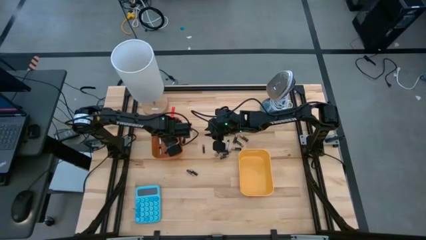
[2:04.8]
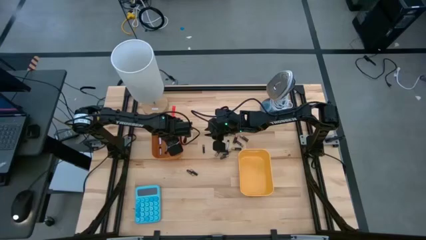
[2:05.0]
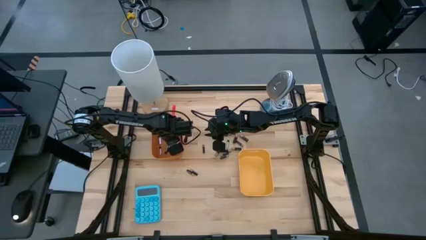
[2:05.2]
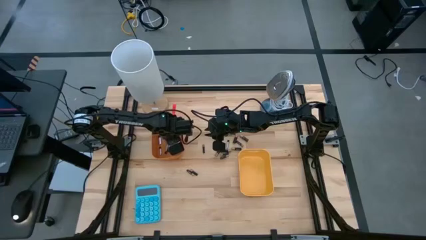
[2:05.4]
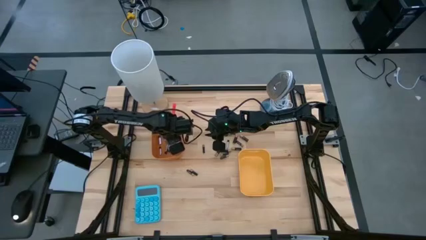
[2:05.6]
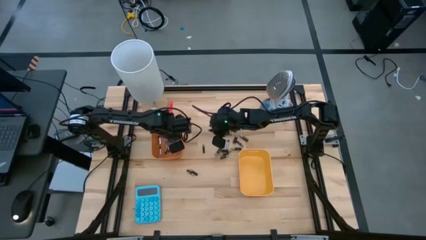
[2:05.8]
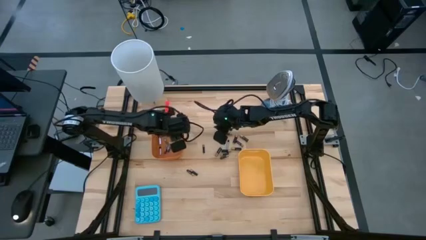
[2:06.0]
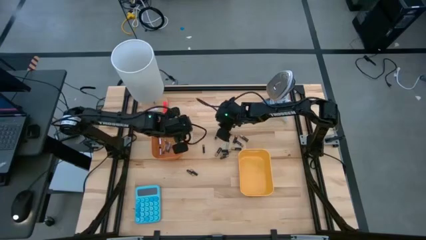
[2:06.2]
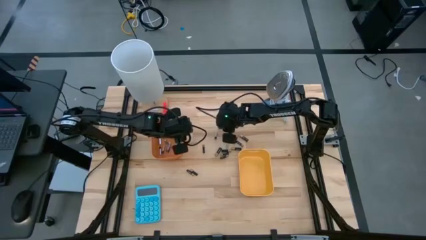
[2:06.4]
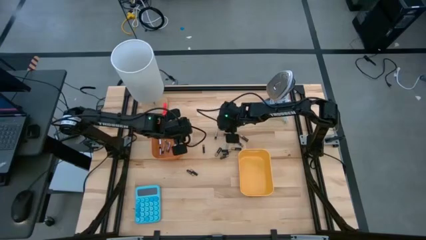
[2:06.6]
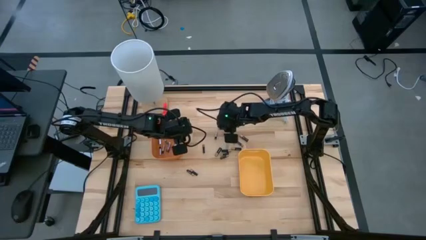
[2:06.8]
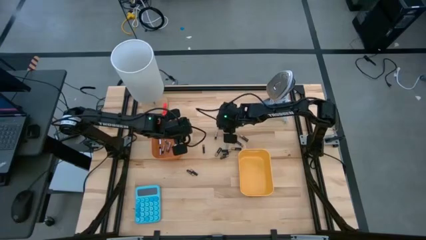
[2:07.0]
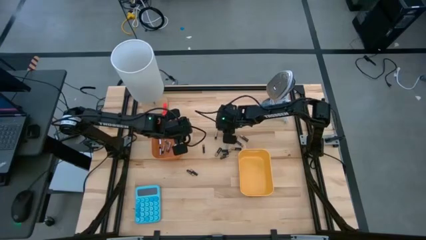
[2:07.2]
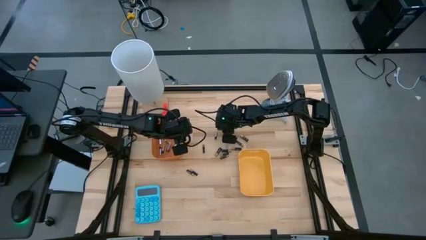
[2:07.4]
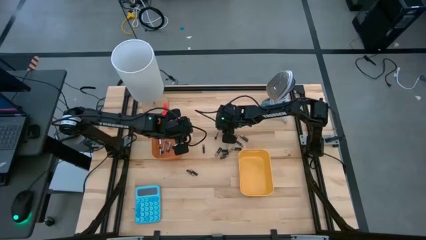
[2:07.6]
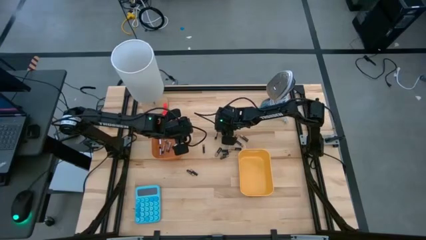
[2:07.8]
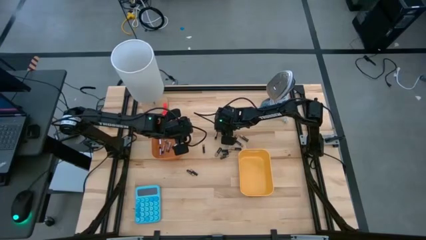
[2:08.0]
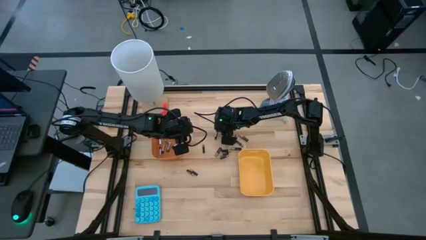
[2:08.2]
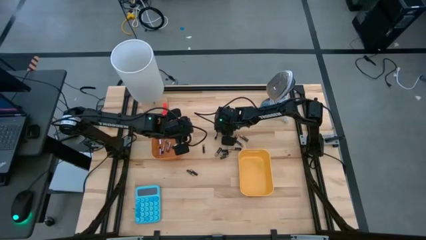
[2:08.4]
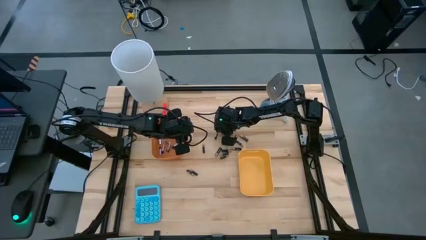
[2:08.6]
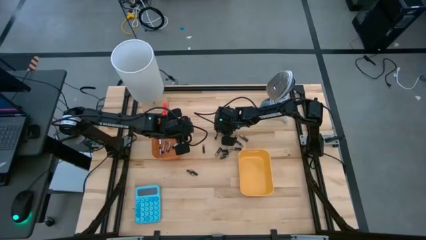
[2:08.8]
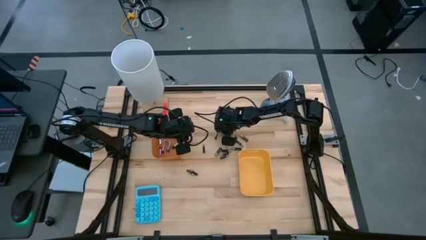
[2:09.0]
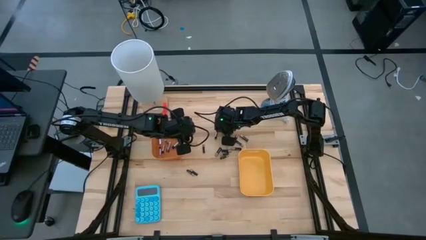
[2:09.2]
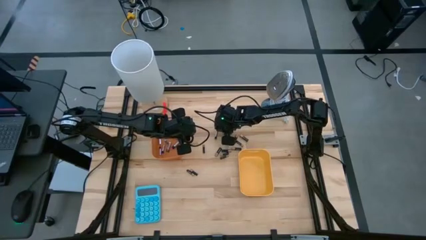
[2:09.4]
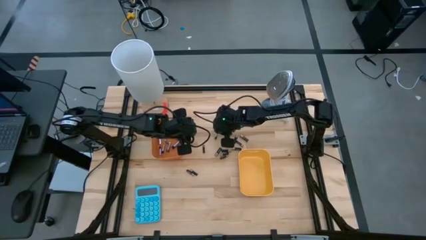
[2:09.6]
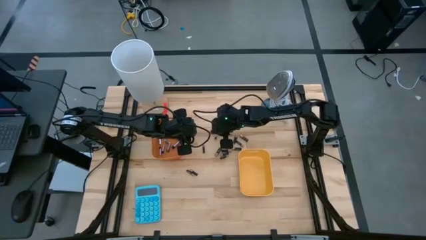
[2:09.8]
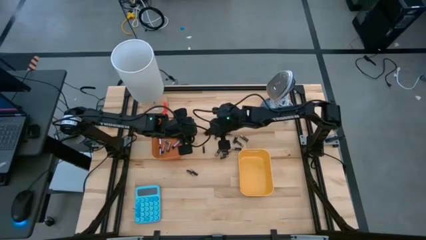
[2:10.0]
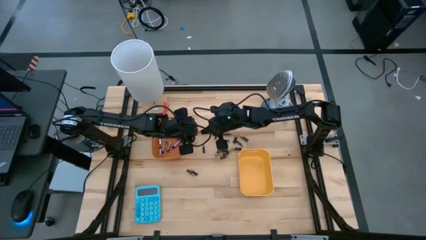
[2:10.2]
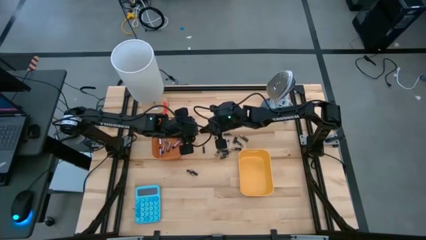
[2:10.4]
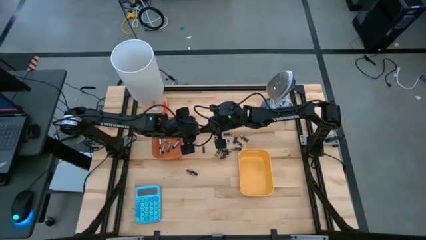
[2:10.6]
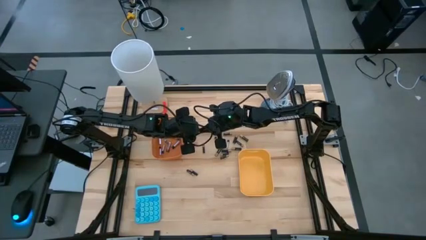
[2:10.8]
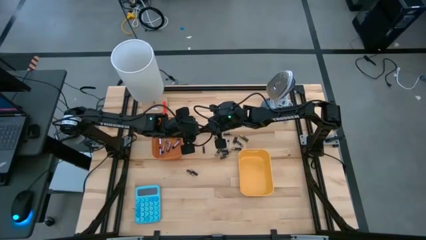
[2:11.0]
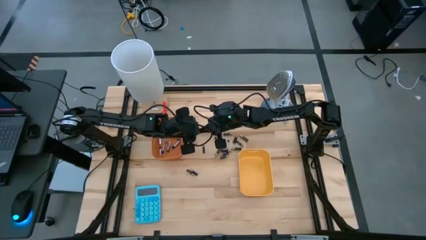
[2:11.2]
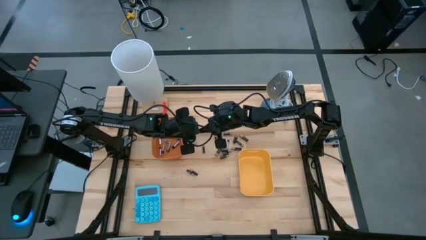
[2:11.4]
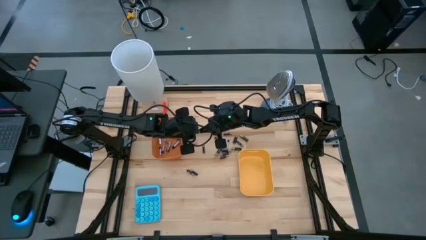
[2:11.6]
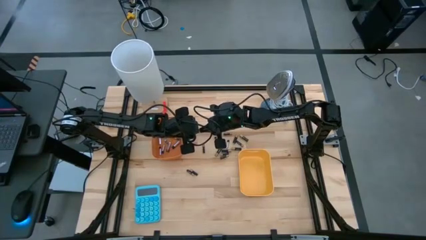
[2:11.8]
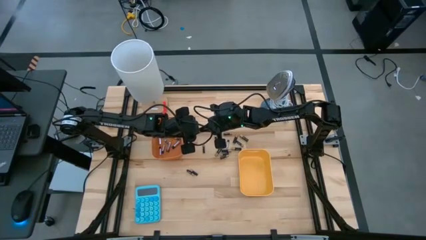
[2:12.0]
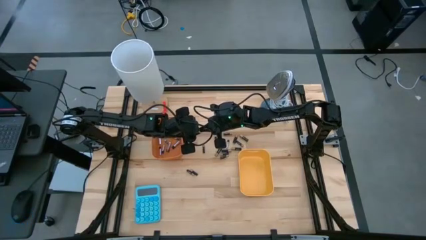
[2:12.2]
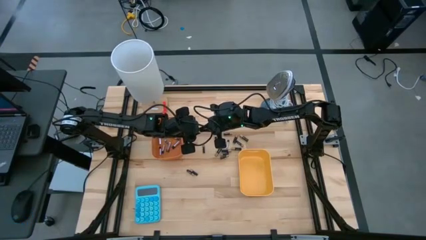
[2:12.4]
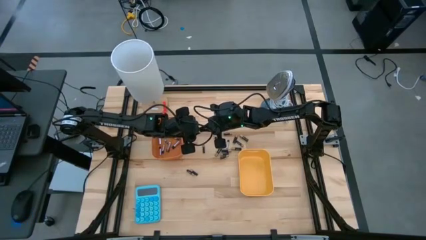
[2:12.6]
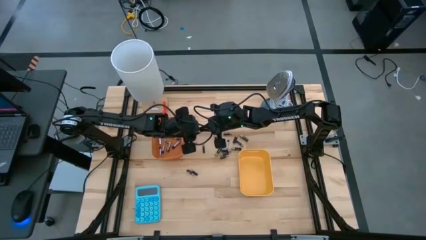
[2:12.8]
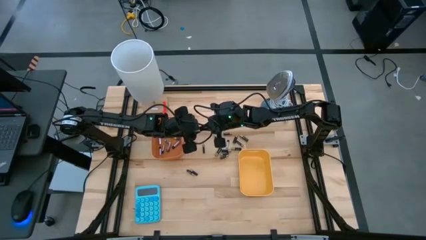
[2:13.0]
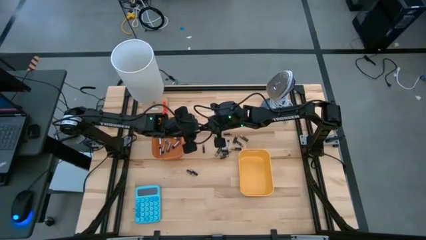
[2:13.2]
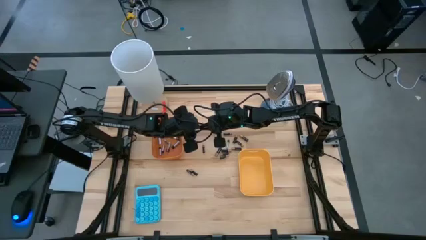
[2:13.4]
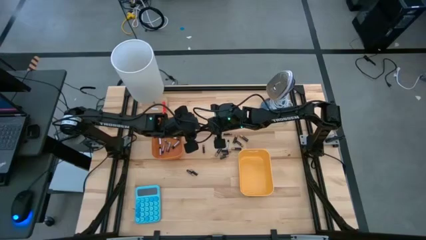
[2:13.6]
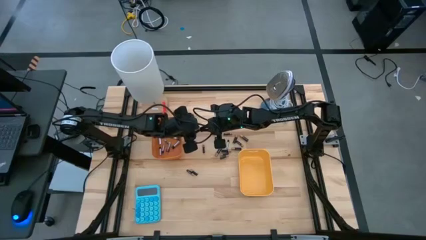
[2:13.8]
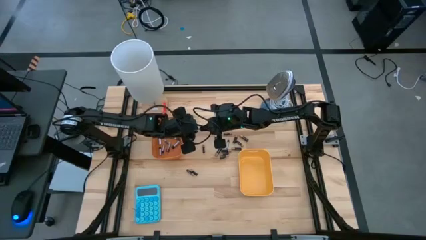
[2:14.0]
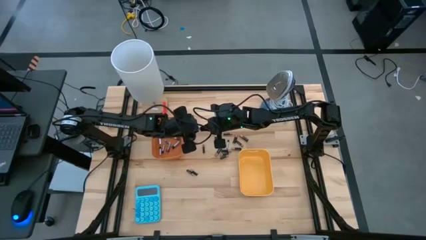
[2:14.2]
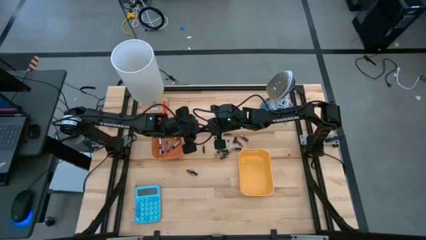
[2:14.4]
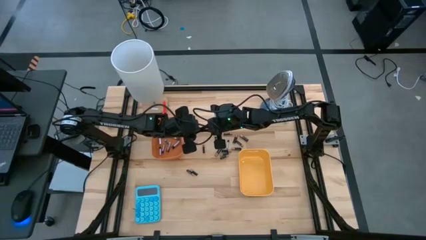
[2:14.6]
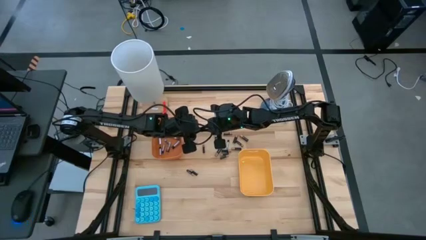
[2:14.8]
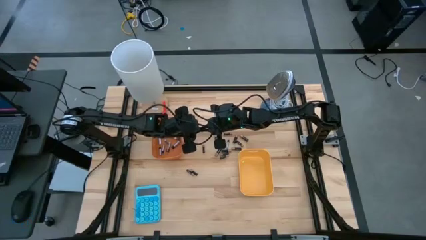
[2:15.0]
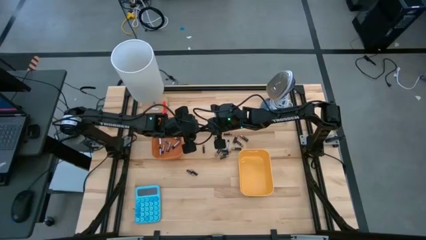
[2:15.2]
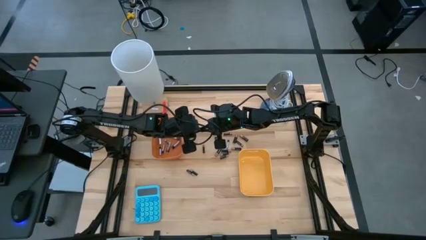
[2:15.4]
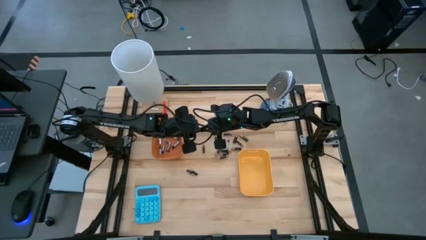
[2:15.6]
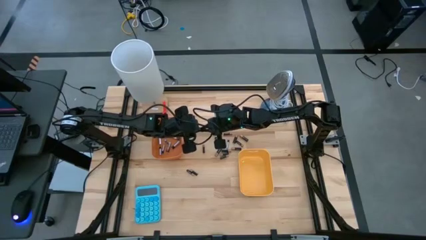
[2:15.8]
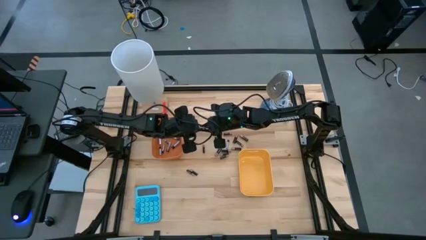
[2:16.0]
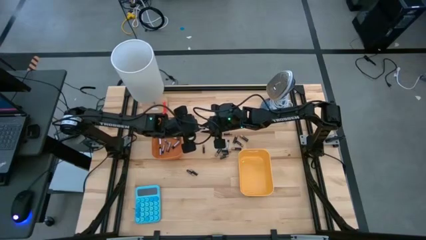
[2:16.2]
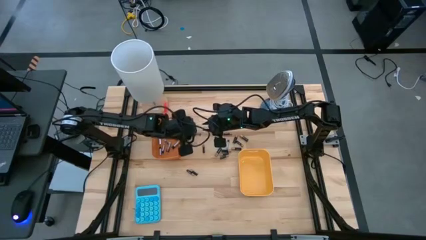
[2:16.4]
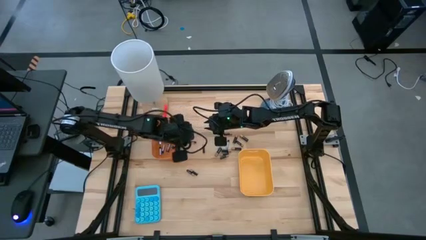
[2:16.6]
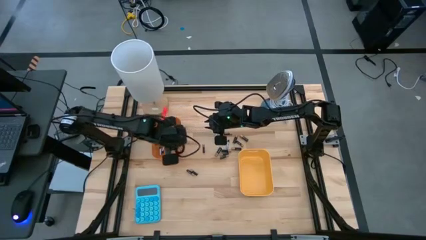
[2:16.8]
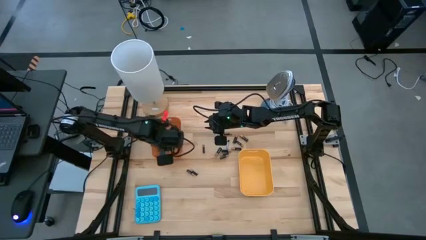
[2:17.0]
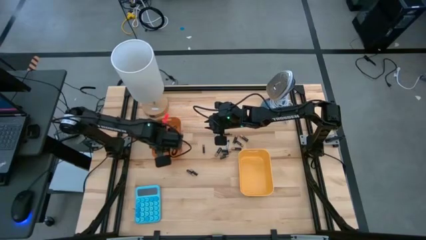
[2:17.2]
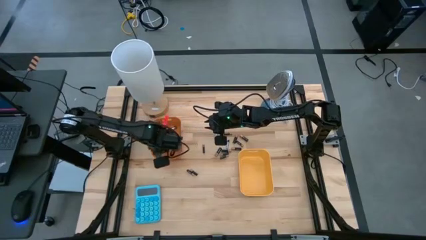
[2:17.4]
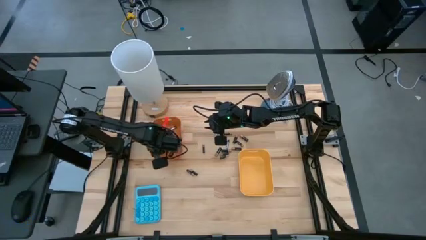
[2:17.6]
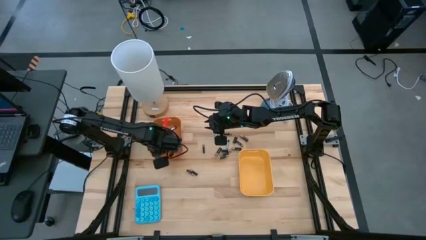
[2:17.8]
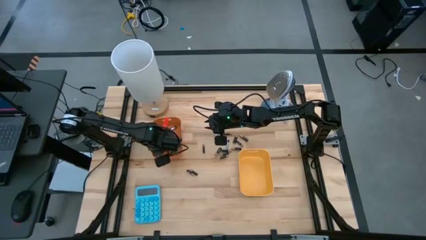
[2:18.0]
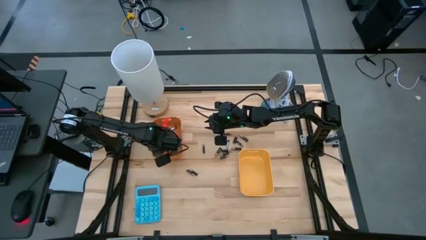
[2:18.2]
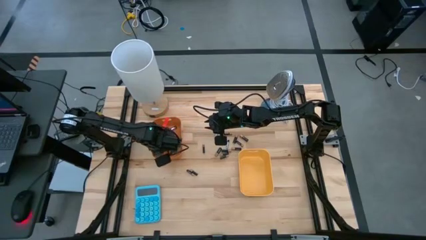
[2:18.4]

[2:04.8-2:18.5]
Task: Sort batteries
Put the silver battery into the orange bin

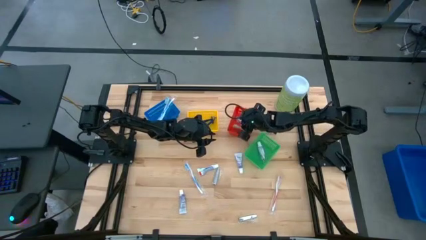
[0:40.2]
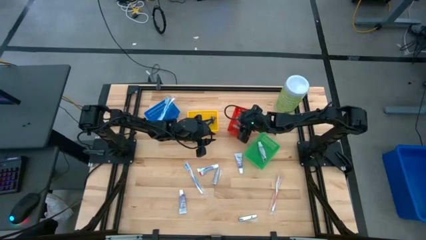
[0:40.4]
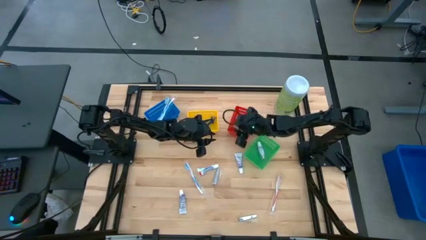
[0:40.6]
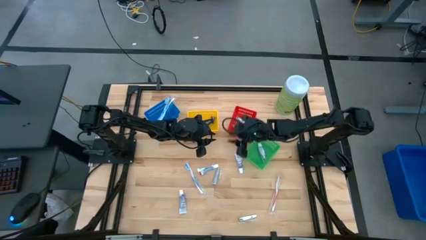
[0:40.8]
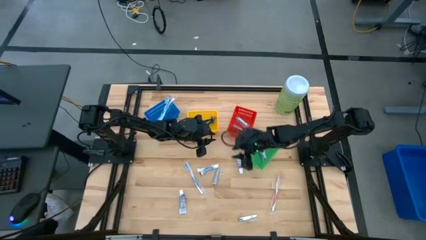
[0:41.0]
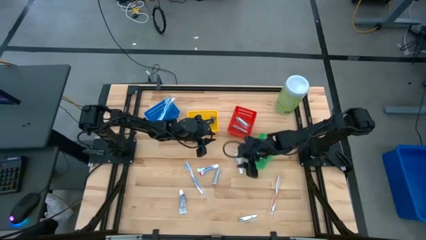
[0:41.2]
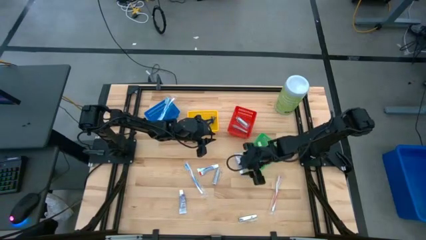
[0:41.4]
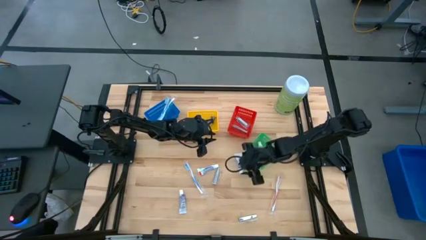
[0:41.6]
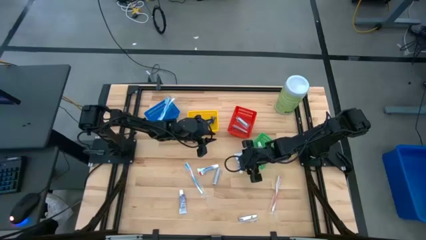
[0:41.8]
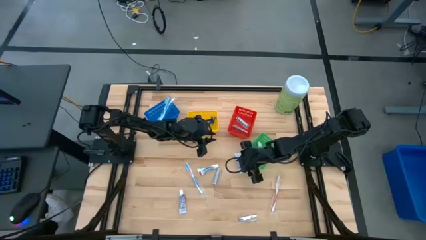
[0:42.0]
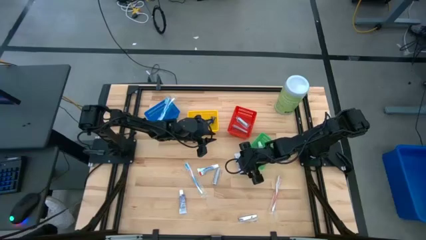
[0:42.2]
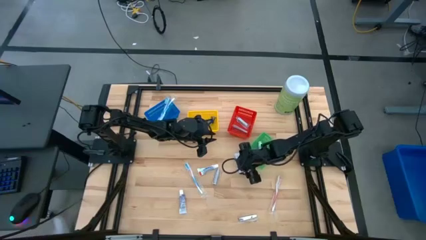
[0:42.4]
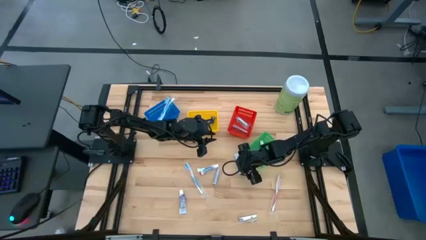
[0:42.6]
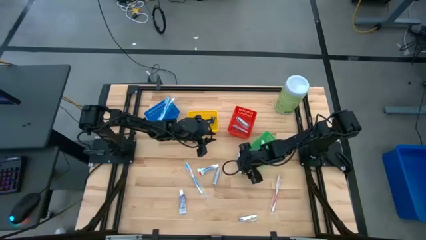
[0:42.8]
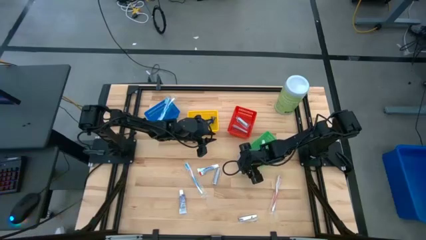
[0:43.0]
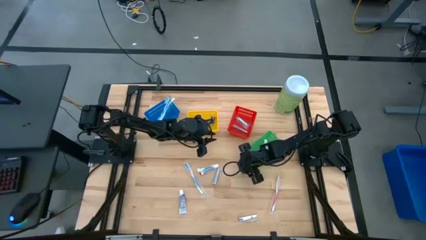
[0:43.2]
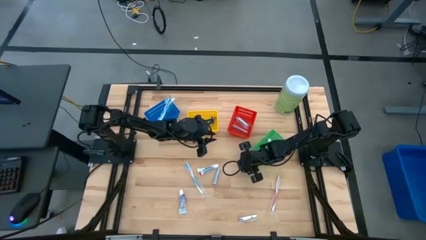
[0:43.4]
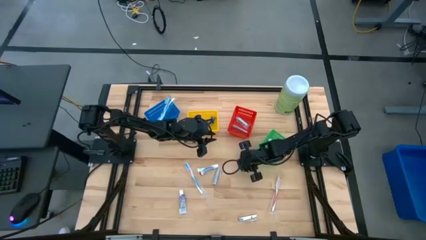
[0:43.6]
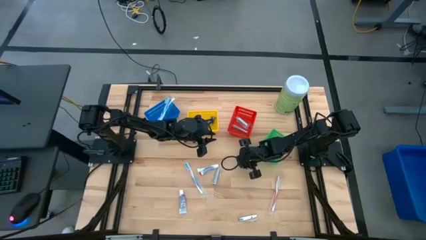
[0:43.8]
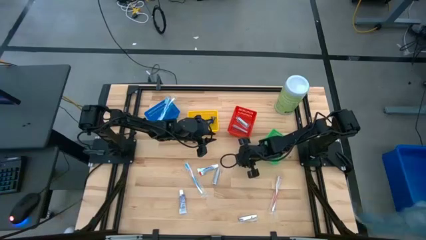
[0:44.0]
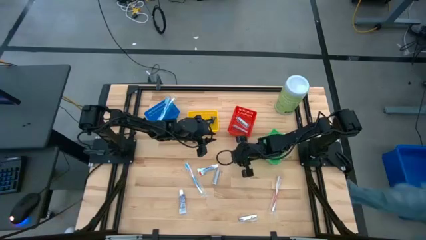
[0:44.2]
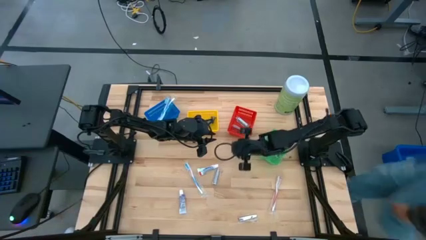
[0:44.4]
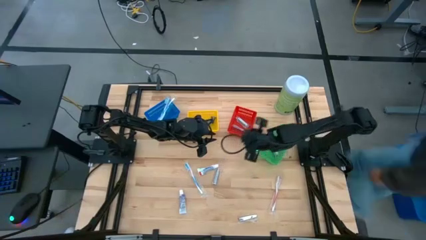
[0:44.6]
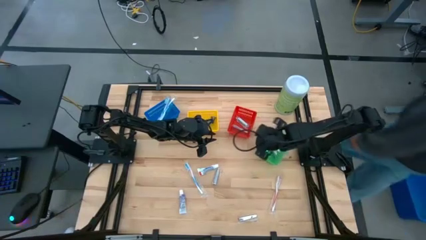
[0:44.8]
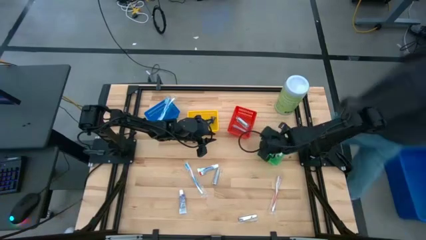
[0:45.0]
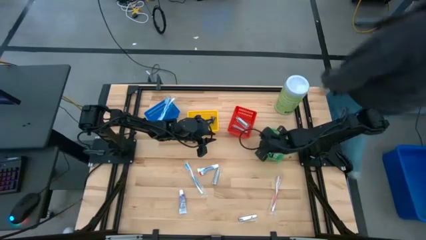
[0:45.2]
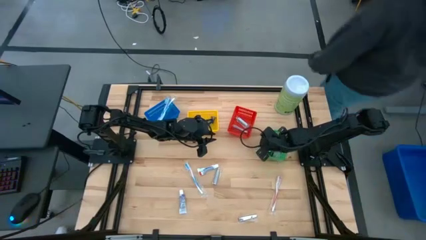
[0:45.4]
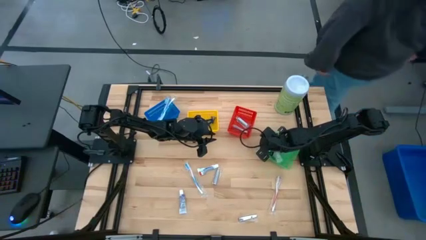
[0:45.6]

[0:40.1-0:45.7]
Task: Pick & Place Travel size toiletries
Put the white toothpaste into the green bin
